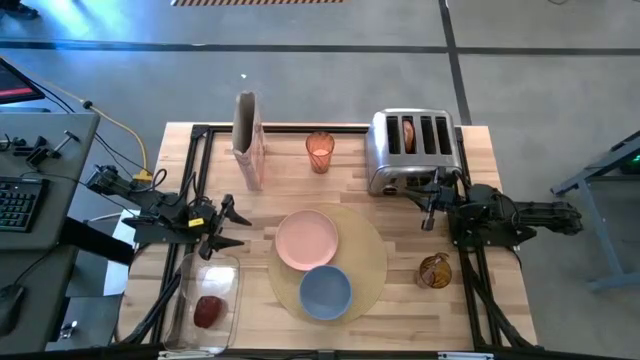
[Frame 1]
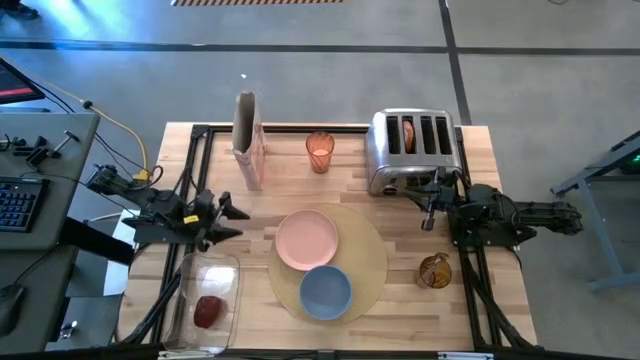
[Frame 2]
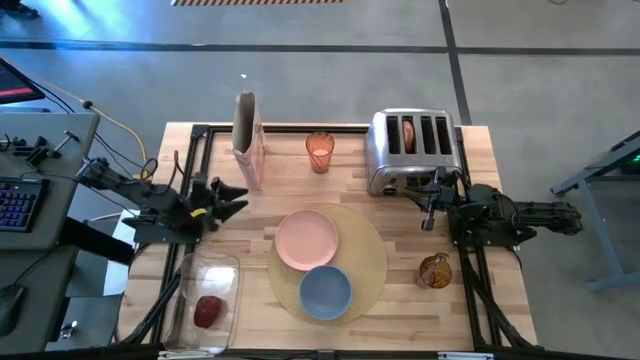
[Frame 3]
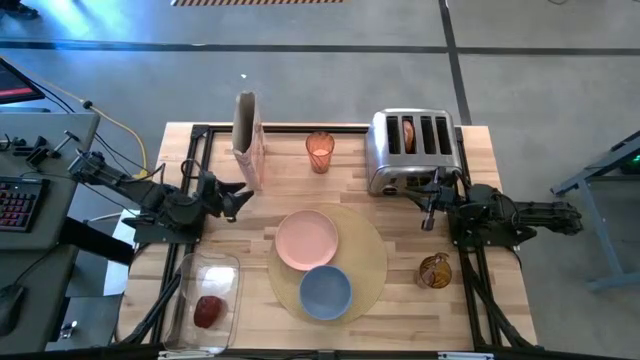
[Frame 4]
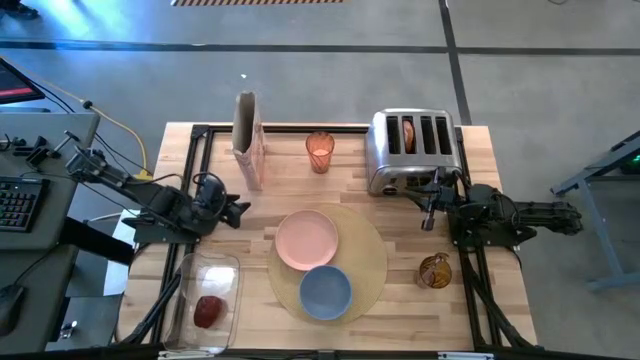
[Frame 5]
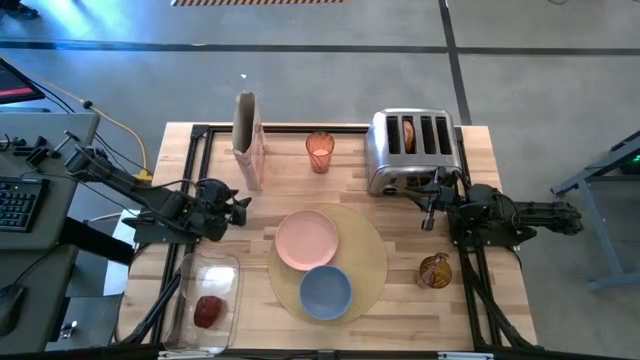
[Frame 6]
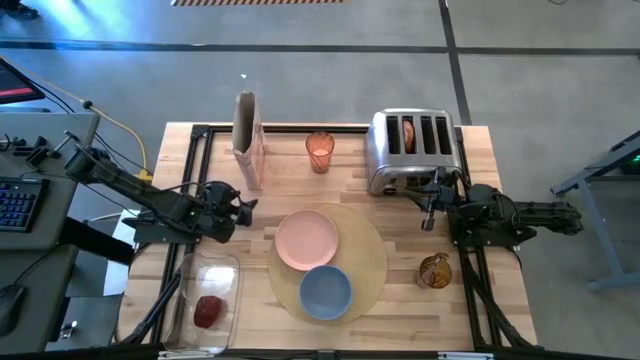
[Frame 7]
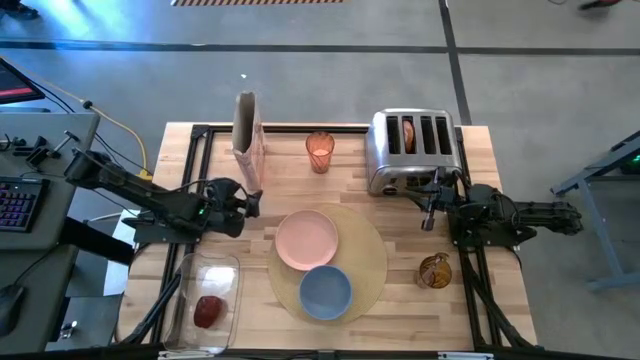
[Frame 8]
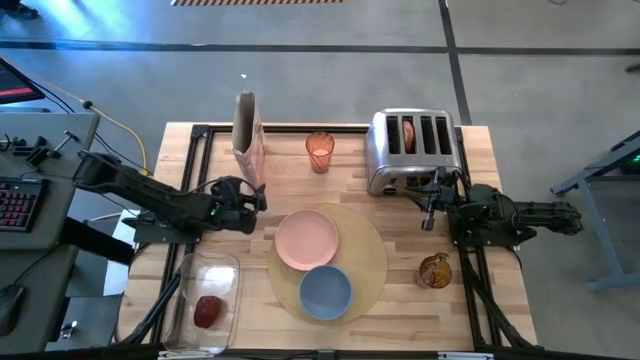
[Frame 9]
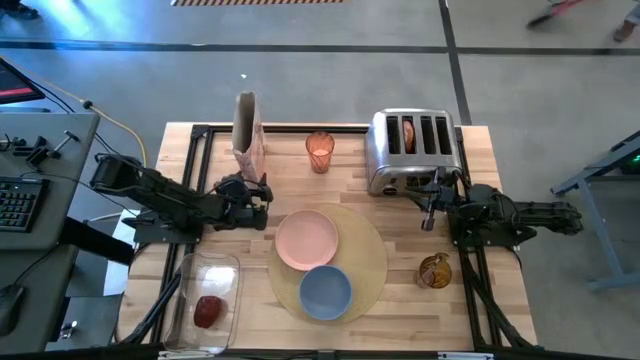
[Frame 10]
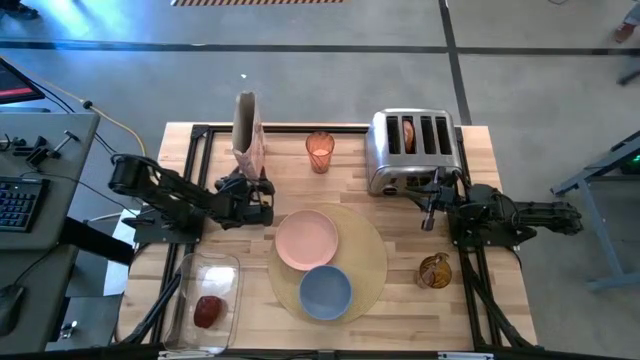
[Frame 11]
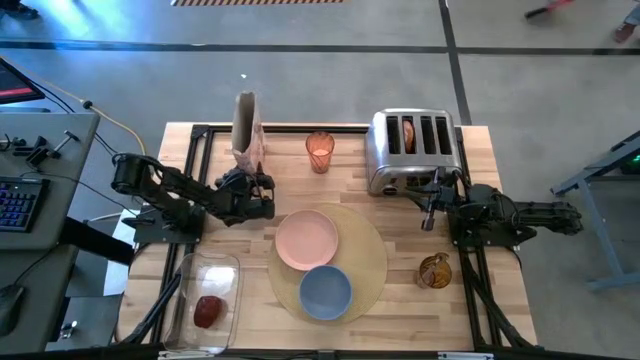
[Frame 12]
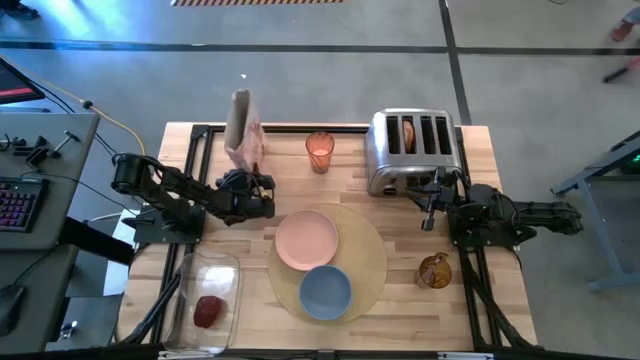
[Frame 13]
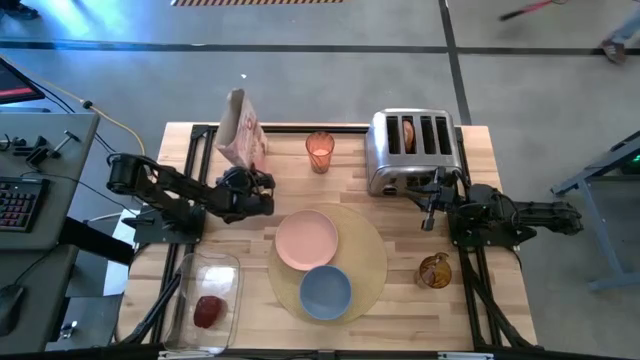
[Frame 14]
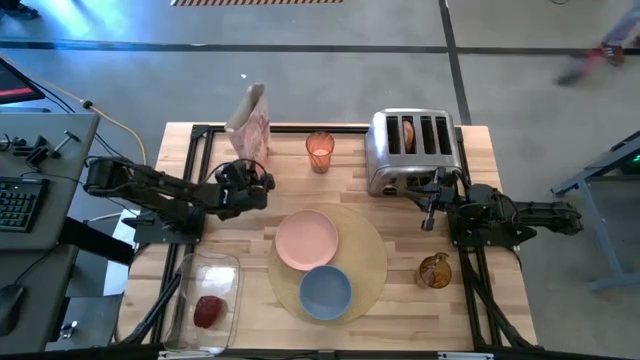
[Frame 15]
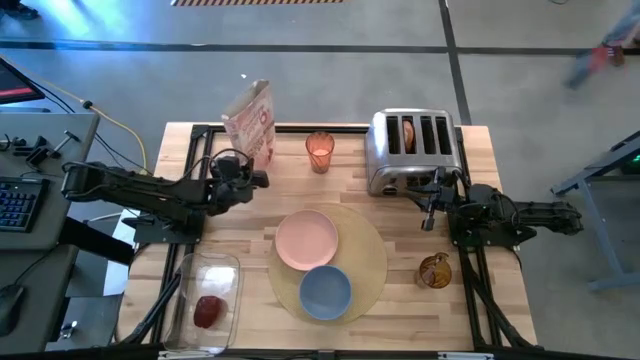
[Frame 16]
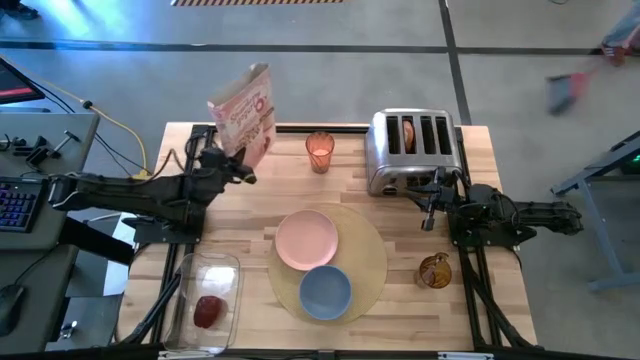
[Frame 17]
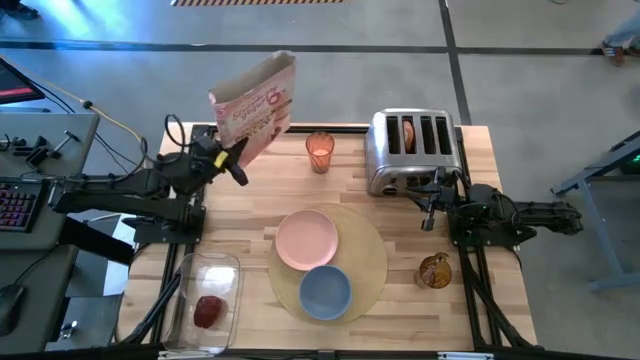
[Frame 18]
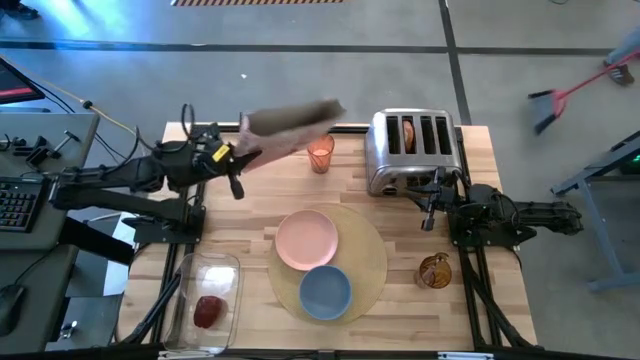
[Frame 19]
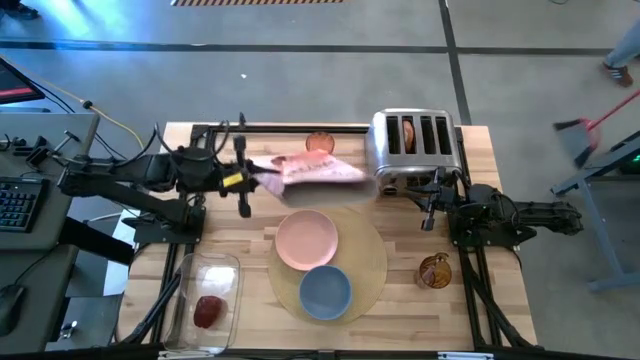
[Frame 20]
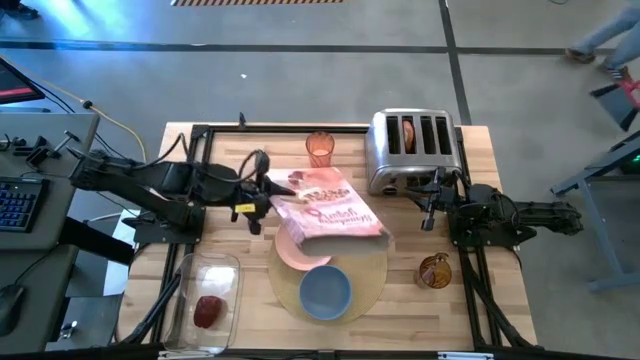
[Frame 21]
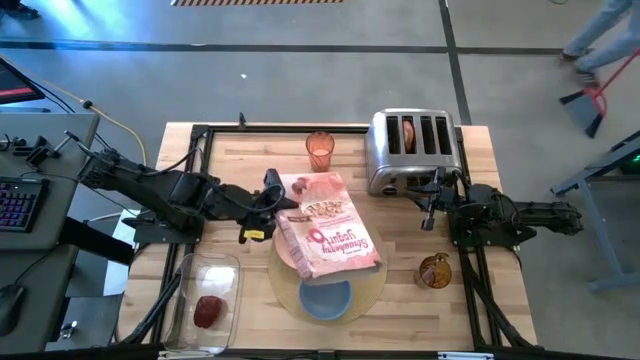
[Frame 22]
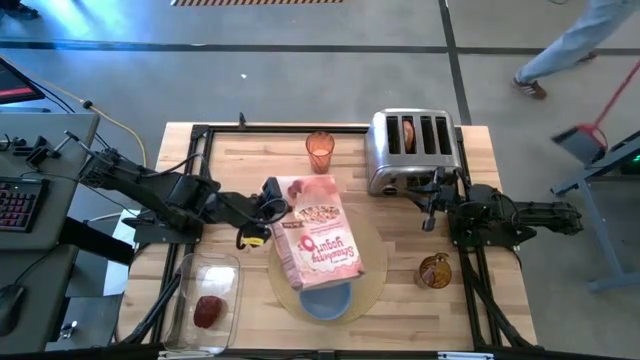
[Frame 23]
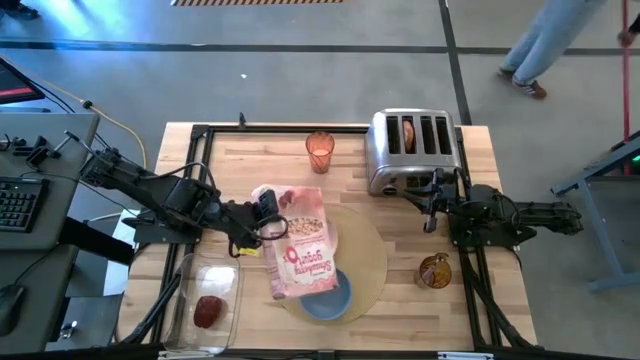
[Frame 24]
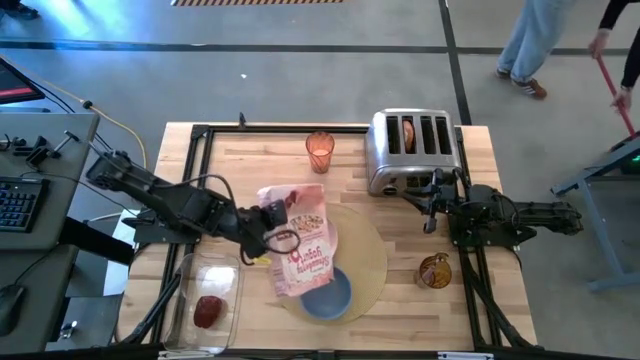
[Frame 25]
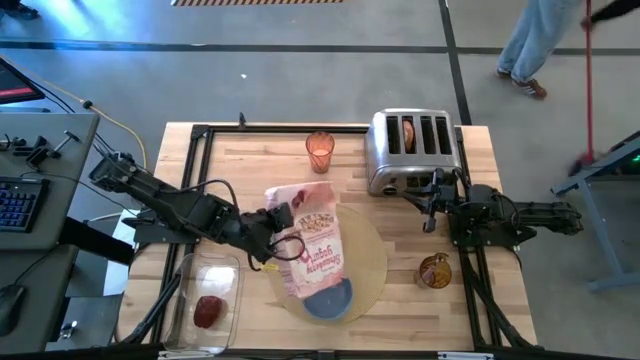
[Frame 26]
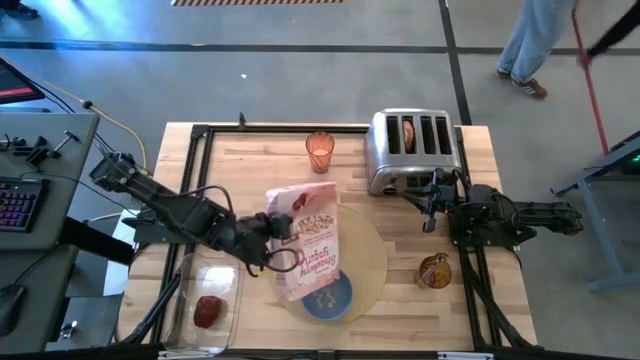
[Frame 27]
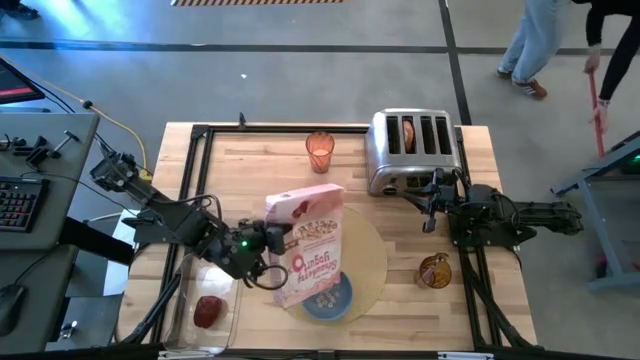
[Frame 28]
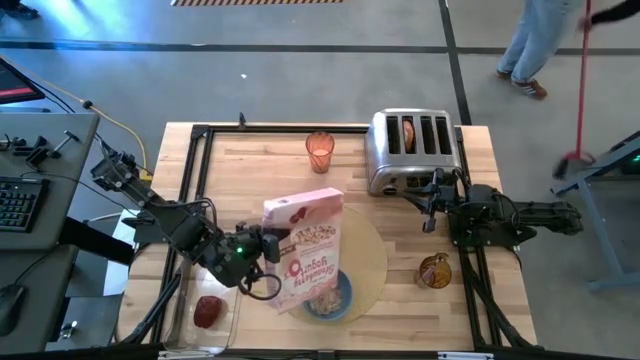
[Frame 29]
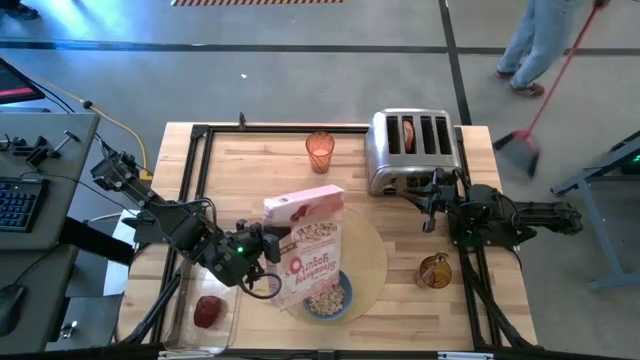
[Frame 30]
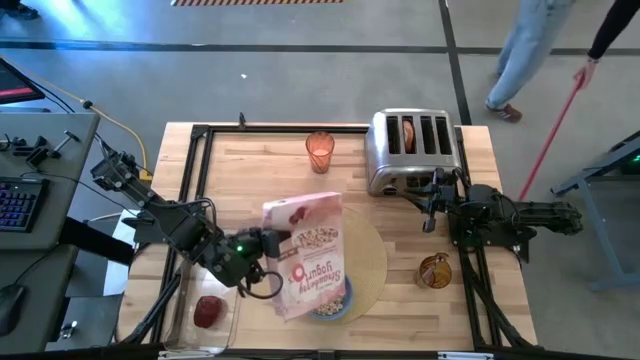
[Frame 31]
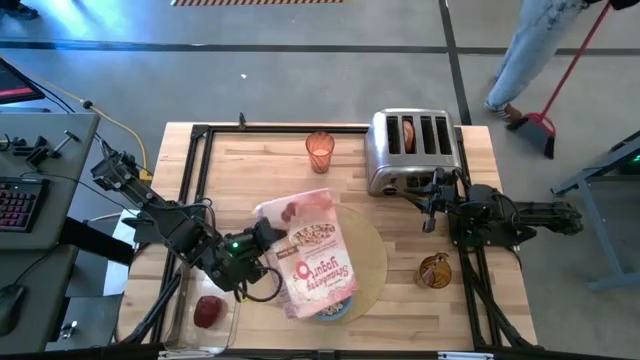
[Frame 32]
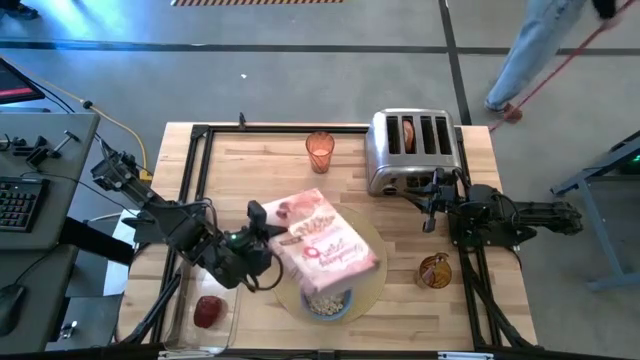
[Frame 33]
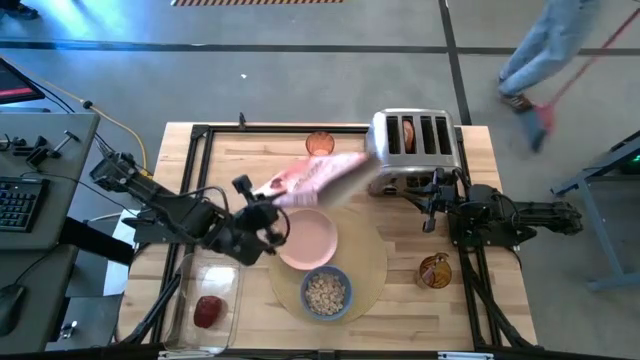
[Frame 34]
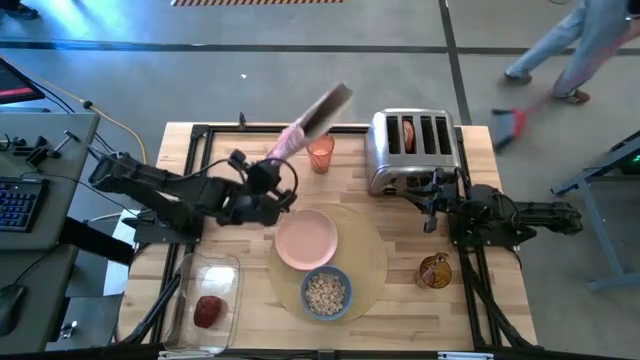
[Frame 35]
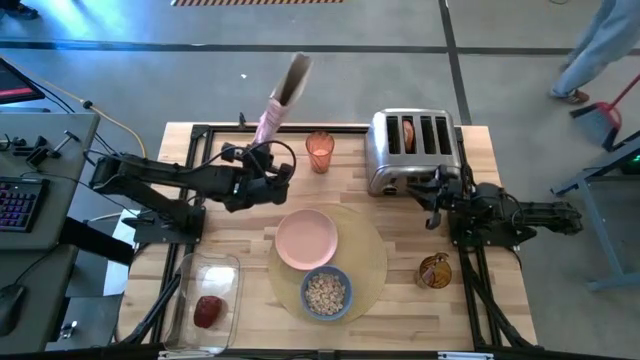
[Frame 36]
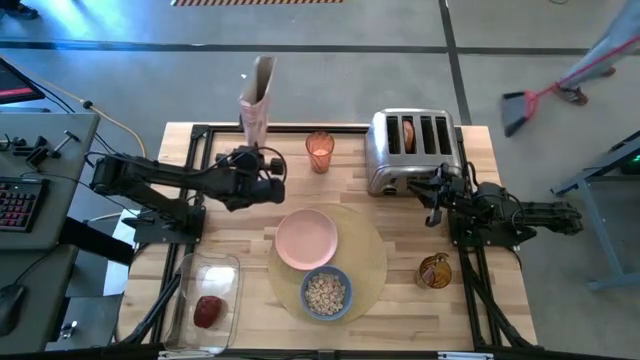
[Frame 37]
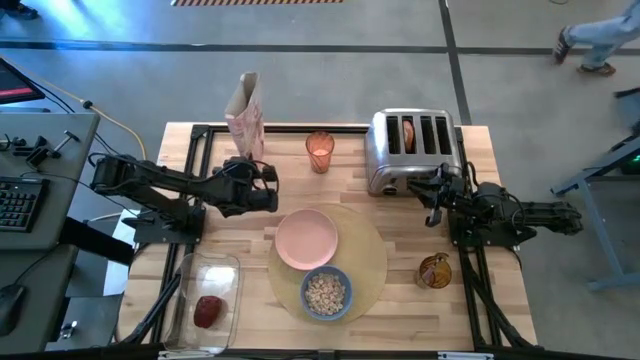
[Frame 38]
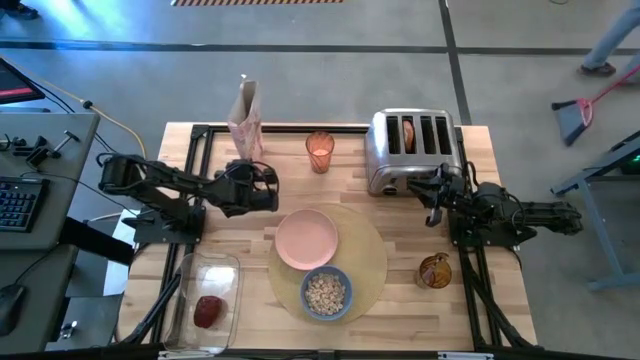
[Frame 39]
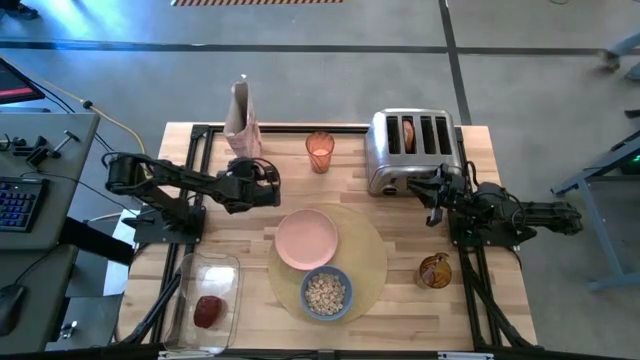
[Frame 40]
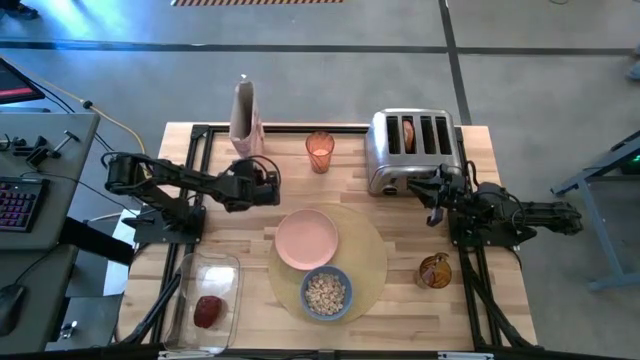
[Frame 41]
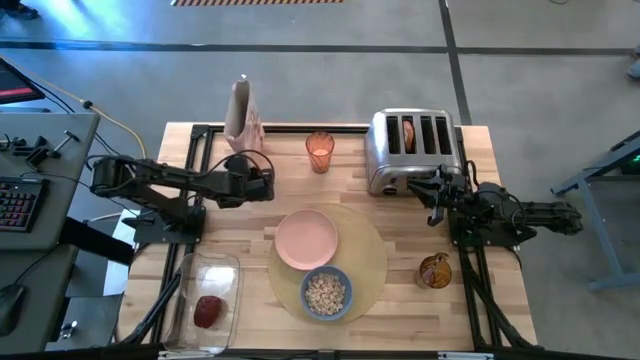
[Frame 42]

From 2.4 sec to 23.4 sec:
Task: Arrange a breakfast setting
Pour the cereal into the blue bowl
